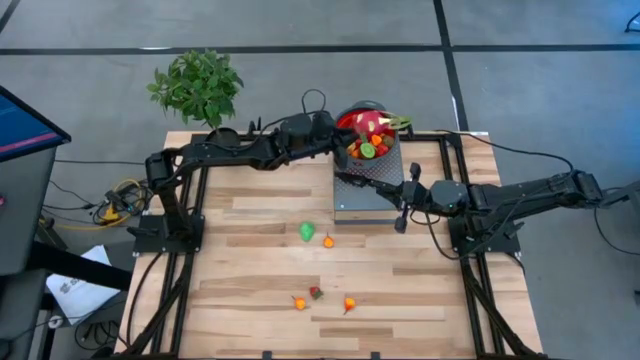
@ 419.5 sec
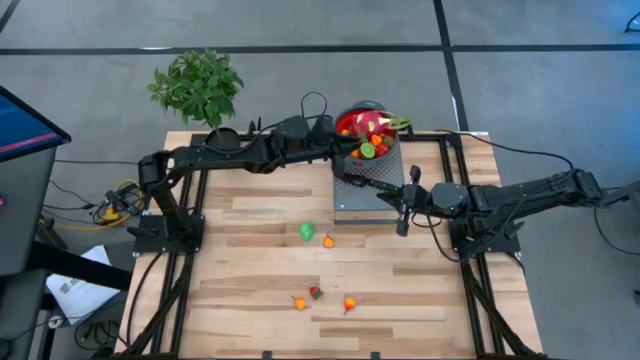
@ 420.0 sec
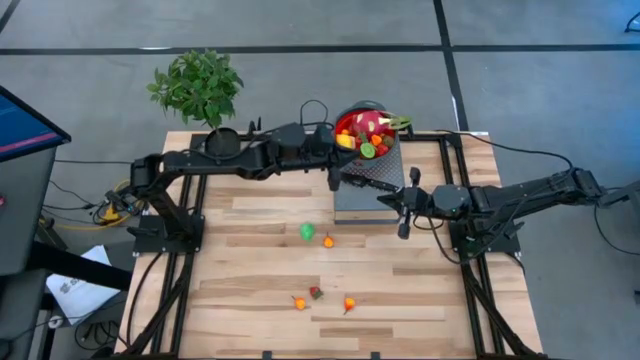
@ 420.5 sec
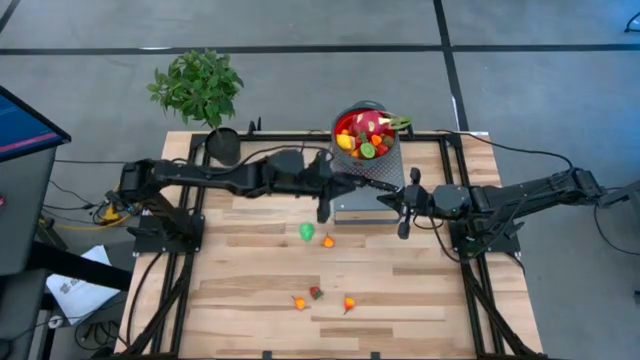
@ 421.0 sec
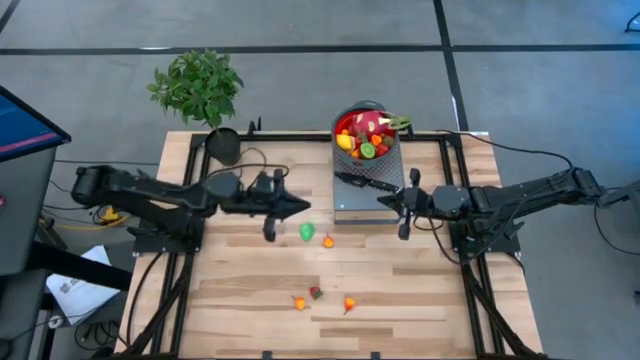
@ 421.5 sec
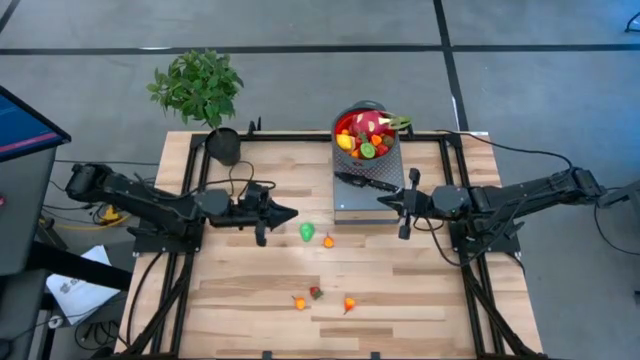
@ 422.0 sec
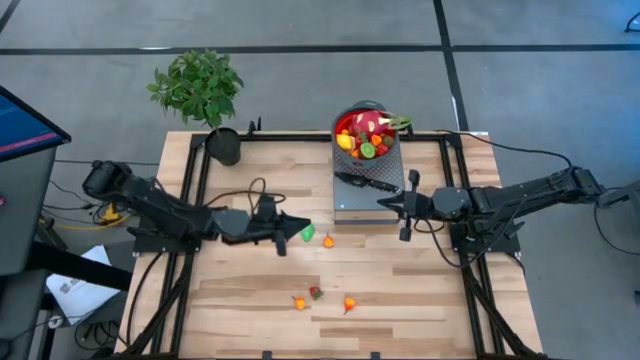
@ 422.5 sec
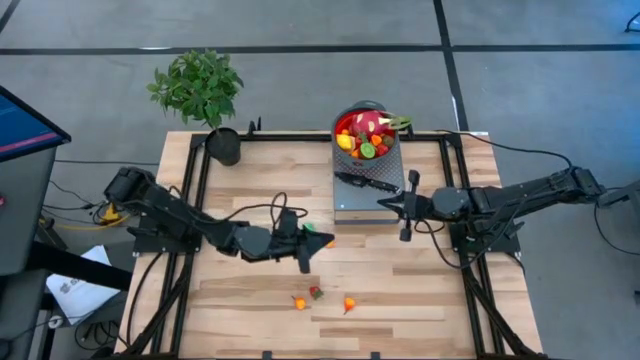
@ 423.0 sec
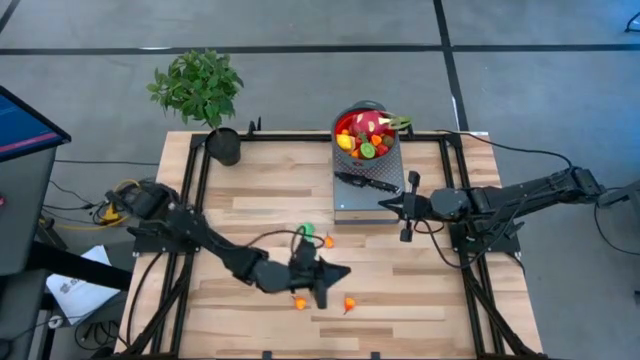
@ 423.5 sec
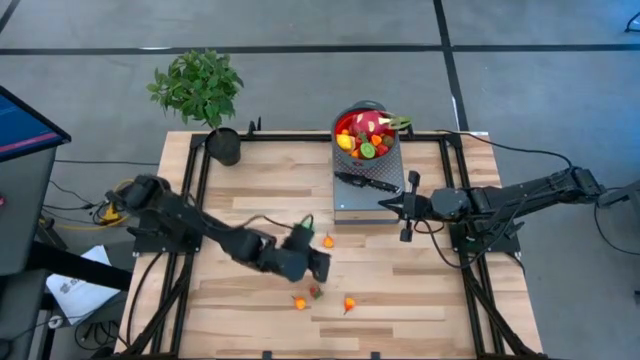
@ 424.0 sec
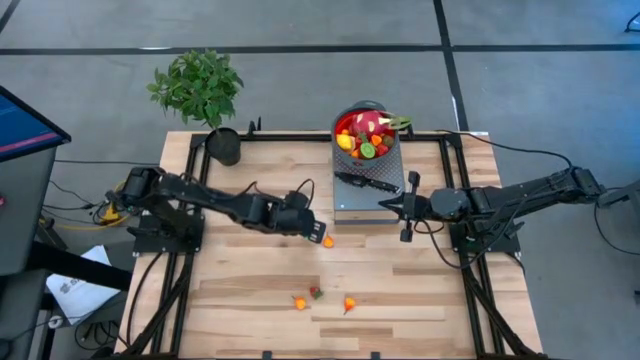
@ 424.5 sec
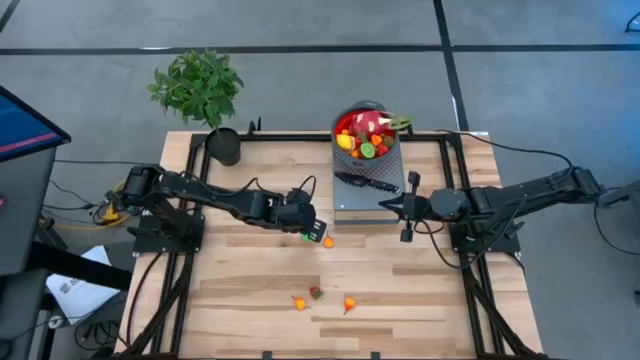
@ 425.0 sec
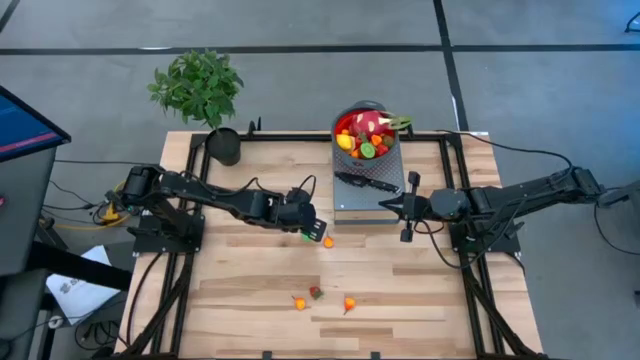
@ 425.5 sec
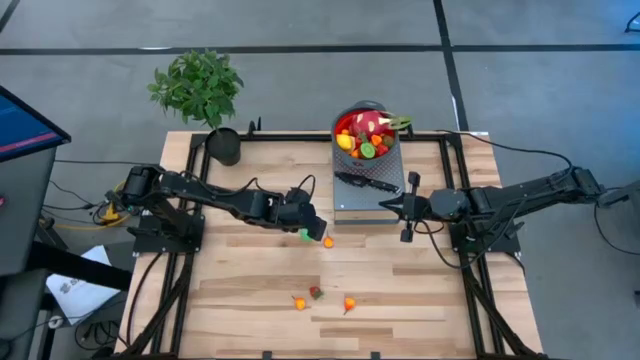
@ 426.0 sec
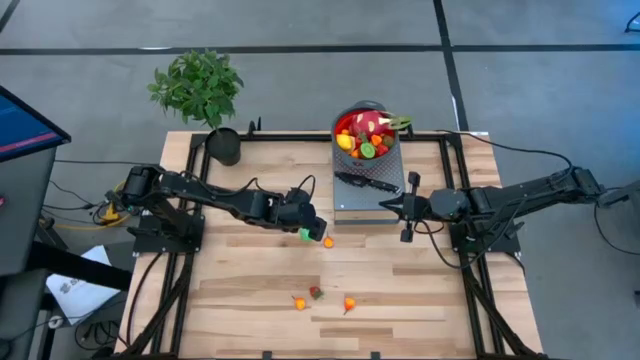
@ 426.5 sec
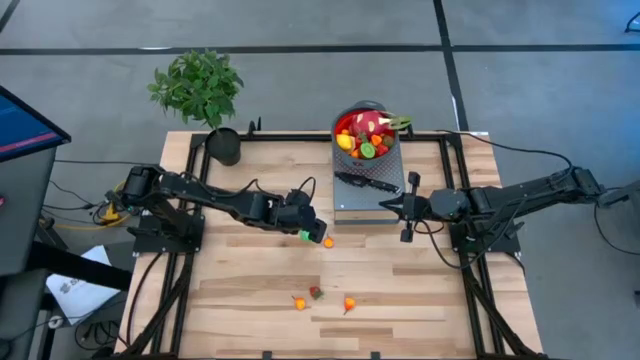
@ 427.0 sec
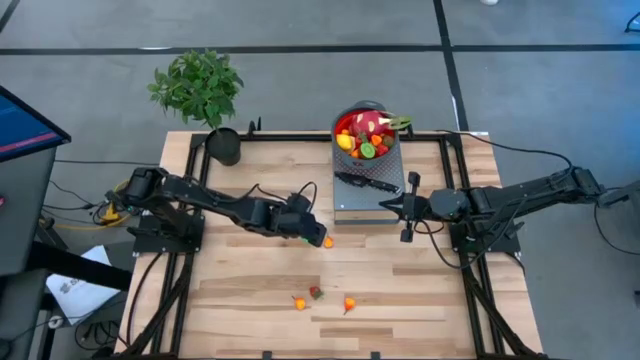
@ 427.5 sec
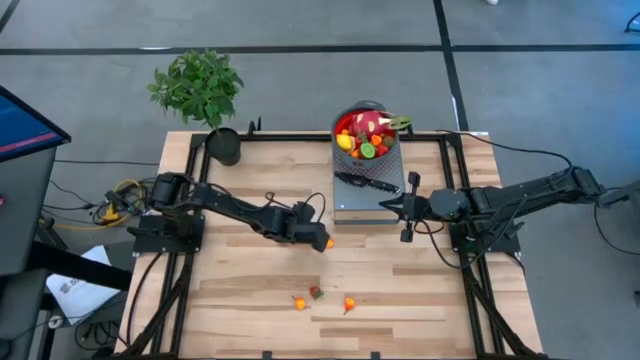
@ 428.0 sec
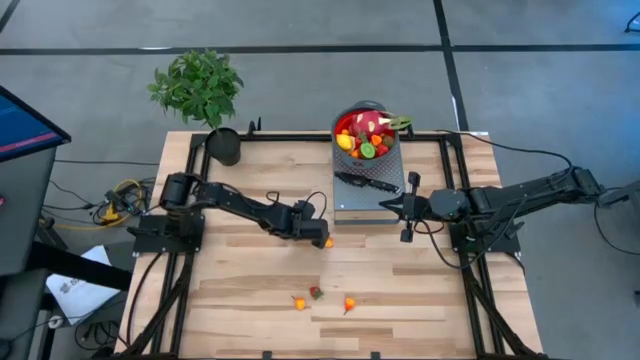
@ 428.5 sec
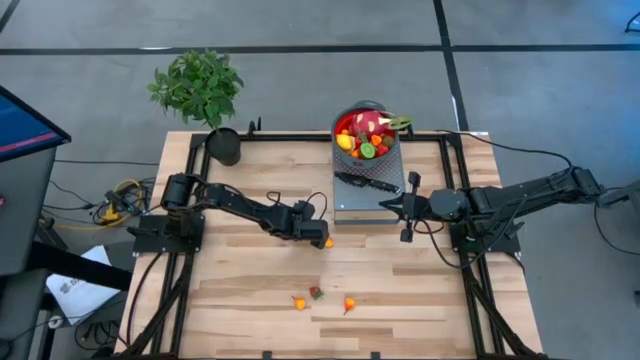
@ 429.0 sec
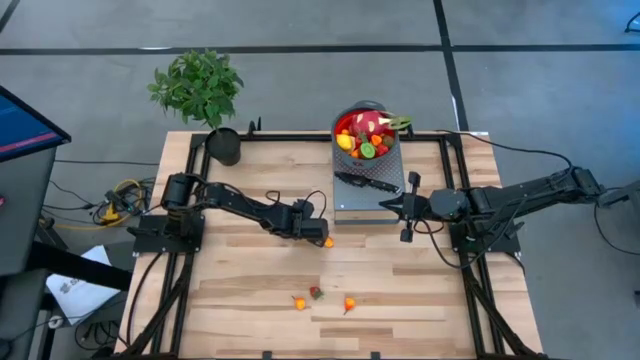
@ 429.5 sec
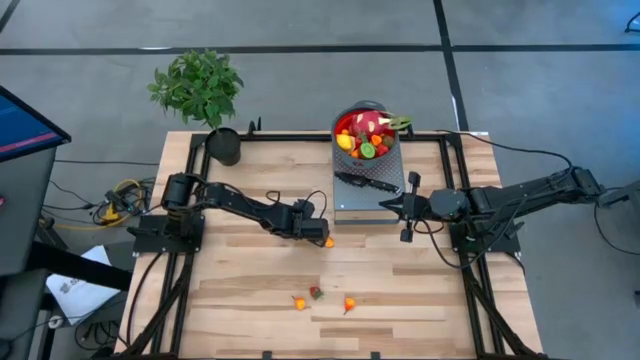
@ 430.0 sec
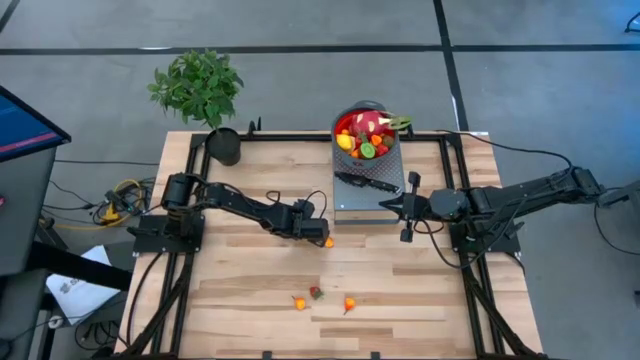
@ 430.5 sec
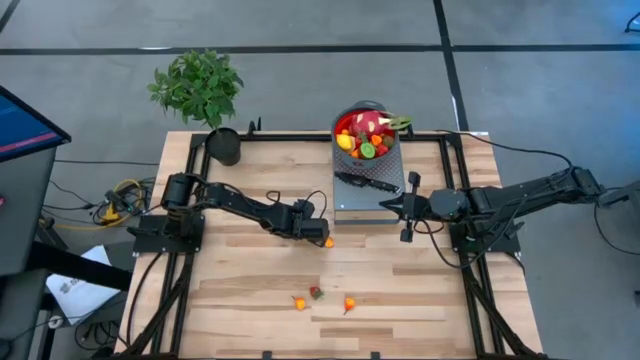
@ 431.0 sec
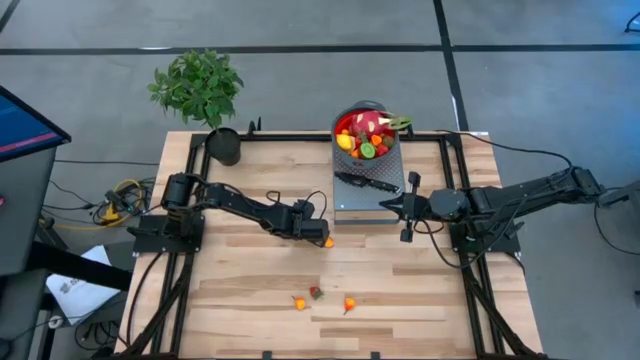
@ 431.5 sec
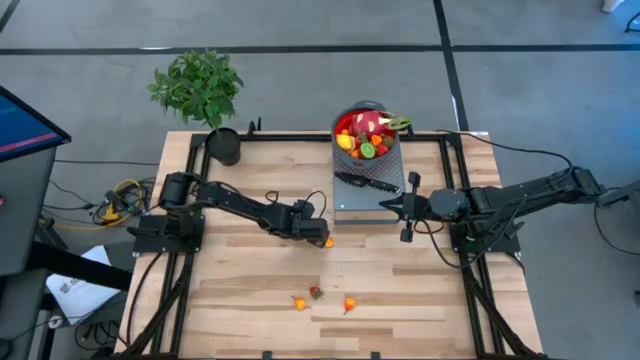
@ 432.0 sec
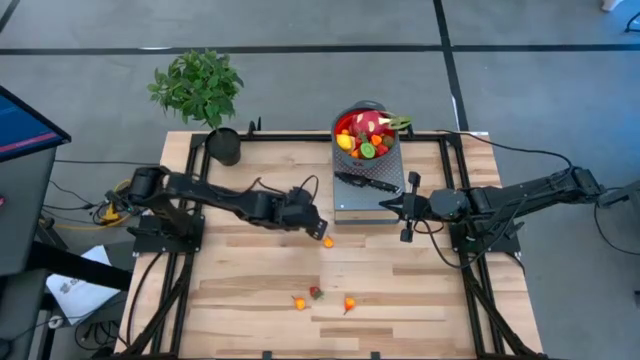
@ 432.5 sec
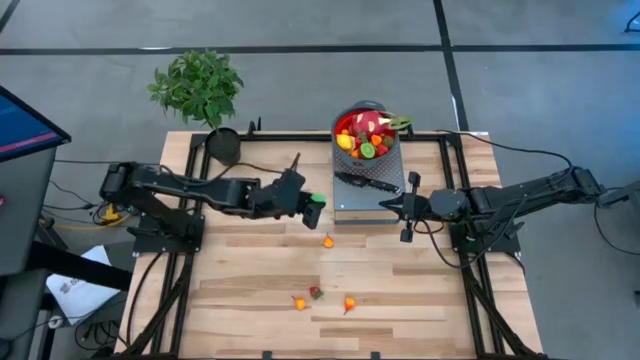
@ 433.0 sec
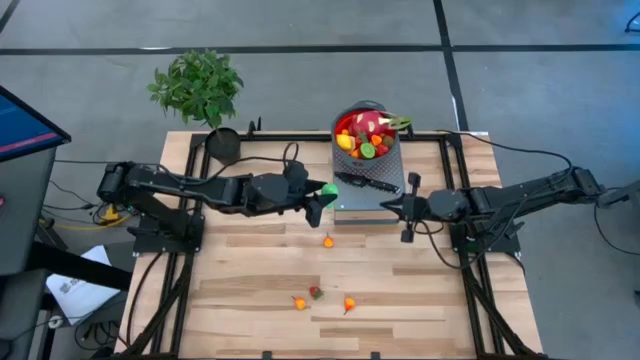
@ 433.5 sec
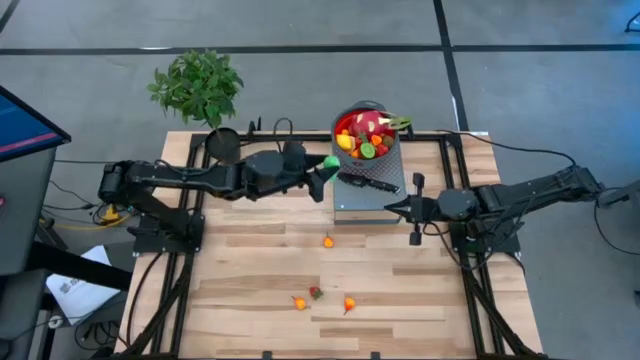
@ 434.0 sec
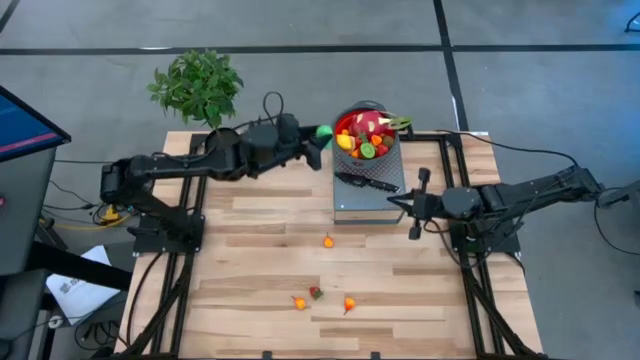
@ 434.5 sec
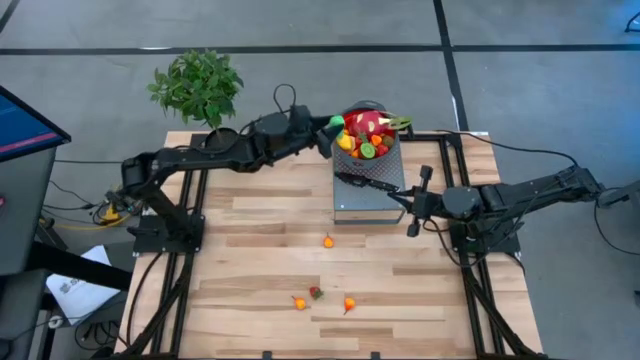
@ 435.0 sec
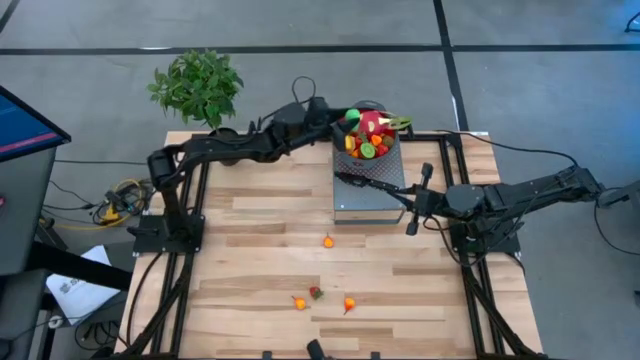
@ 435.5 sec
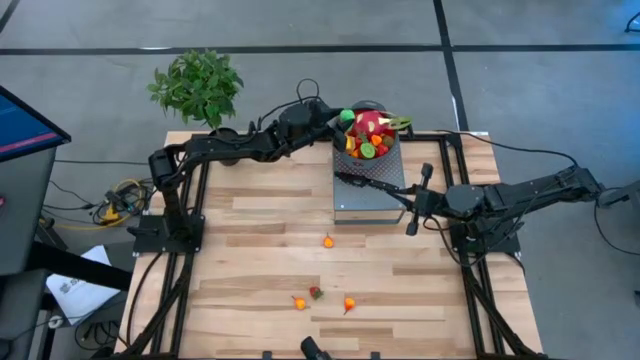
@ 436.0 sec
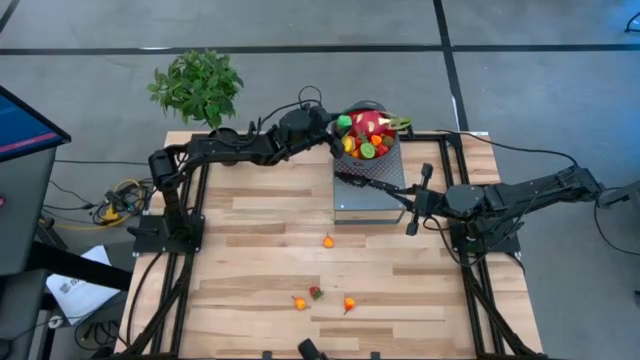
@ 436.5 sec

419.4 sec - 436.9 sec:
Task: Pick & Place Fruit
Put the green pear into the red colander on the shelf

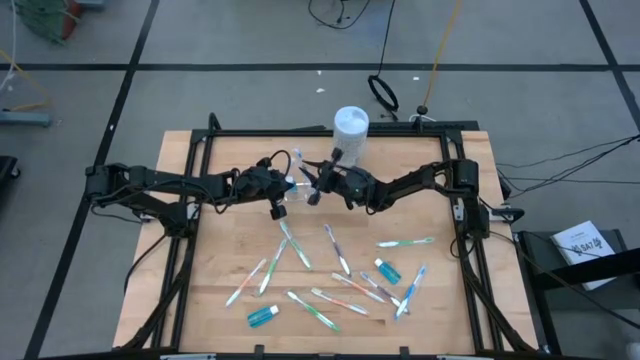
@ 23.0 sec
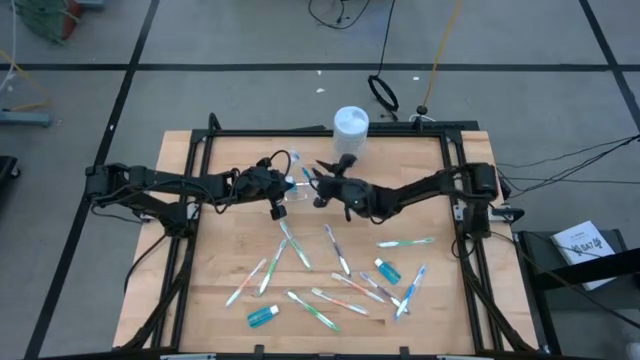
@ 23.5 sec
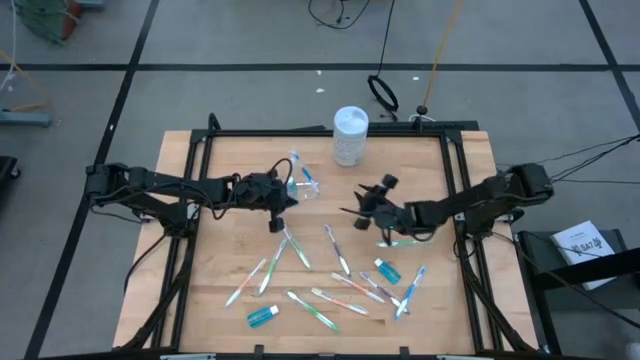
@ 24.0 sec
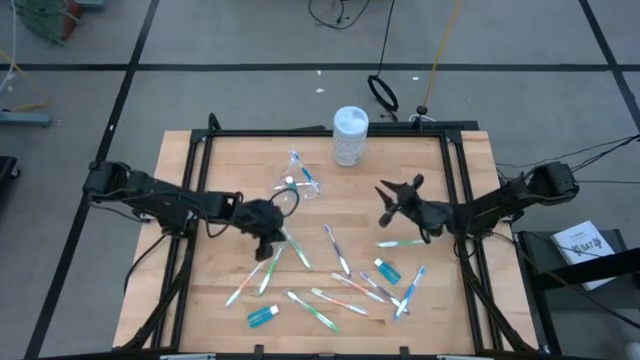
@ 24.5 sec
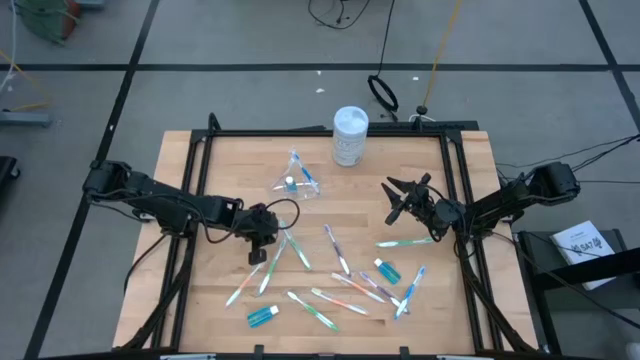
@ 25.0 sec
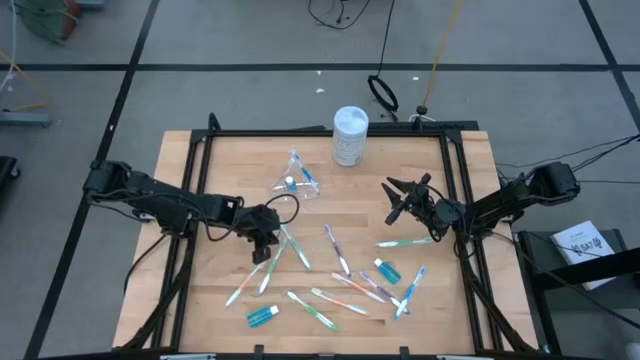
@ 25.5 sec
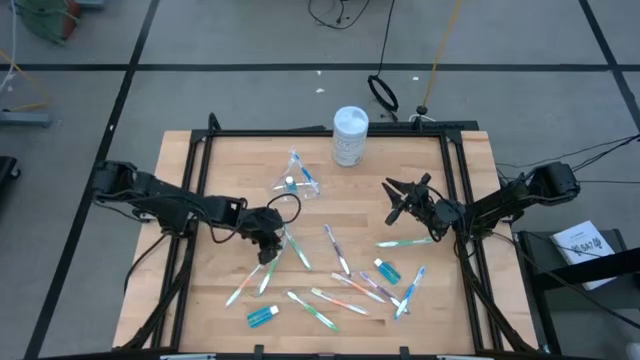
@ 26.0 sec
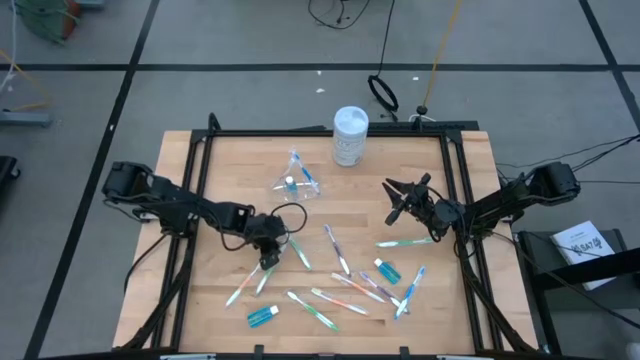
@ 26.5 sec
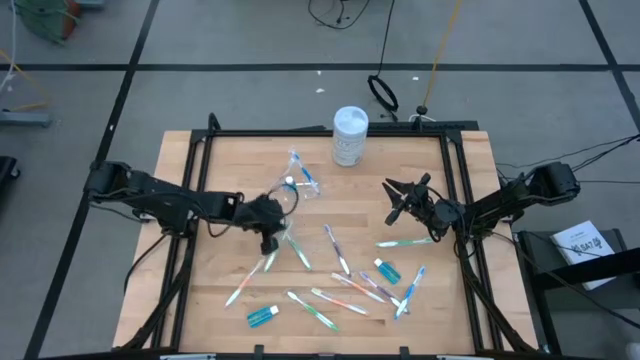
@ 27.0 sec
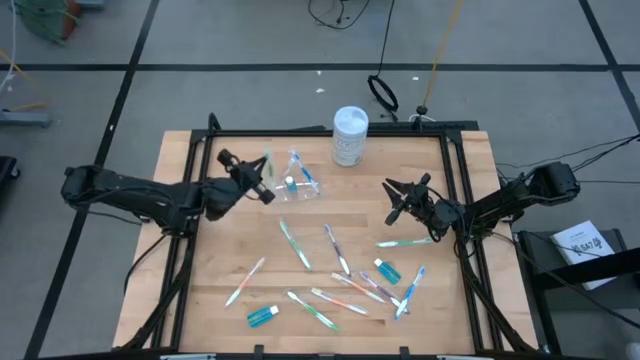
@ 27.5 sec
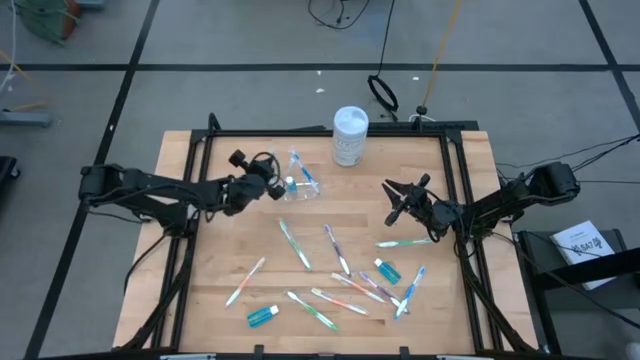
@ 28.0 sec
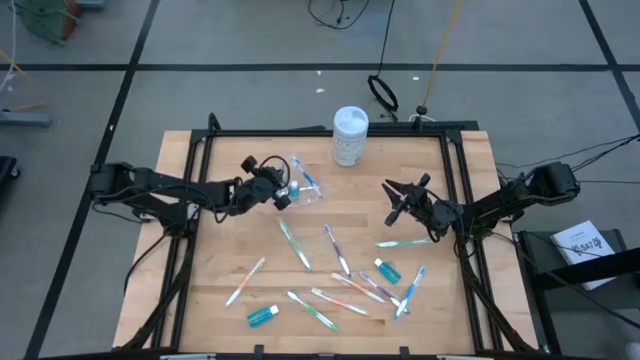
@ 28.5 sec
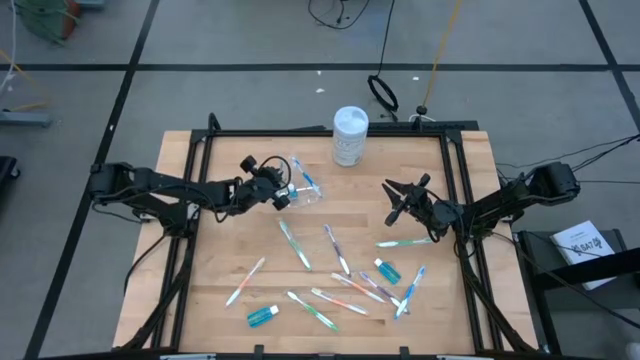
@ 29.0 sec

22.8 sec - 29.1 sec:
Task: Pick & Place toothbrushing station
Put the green toothbrush into the transparent organizer
